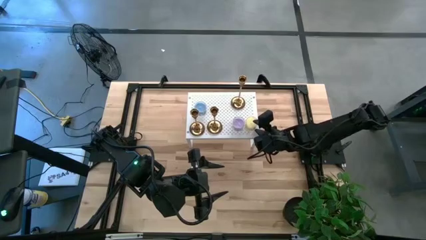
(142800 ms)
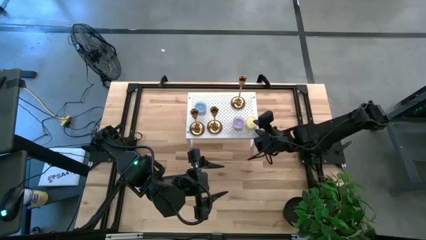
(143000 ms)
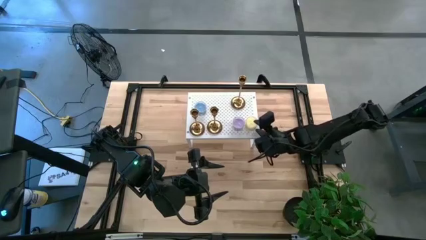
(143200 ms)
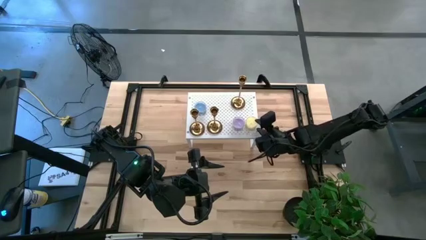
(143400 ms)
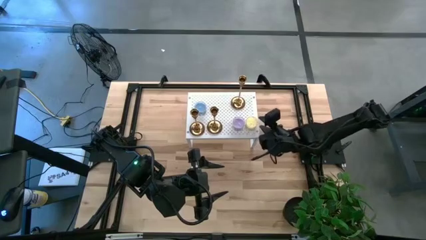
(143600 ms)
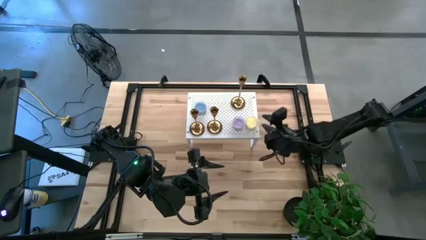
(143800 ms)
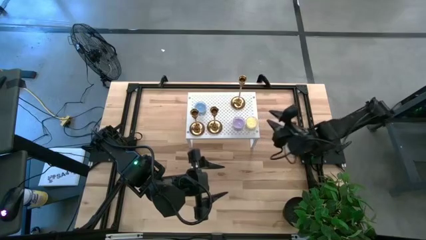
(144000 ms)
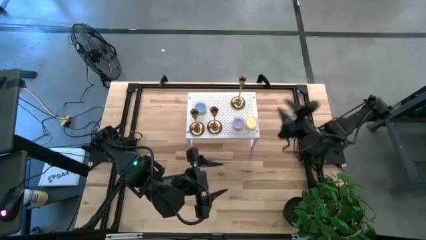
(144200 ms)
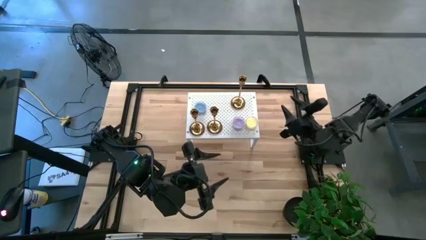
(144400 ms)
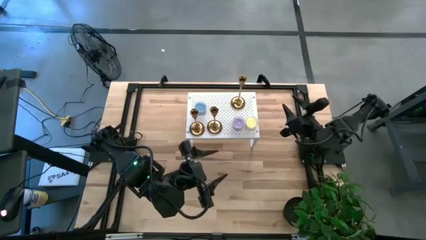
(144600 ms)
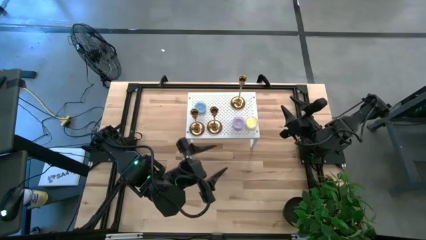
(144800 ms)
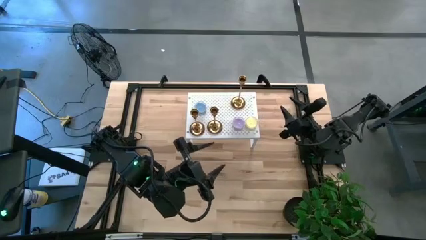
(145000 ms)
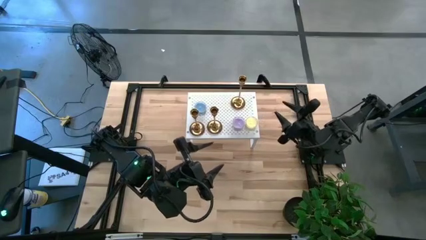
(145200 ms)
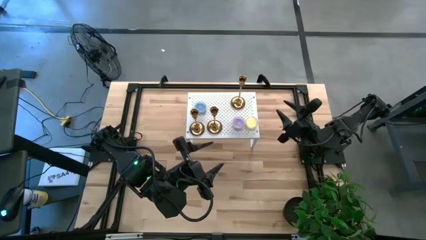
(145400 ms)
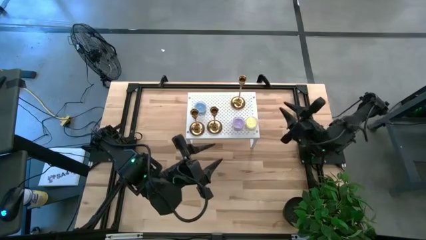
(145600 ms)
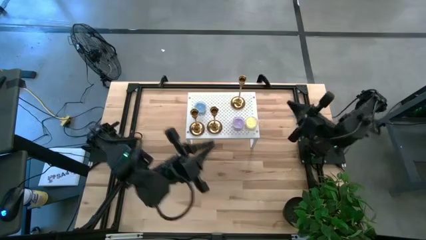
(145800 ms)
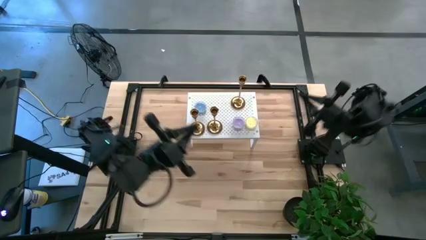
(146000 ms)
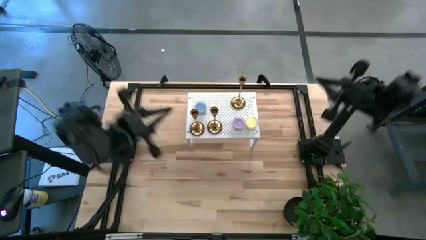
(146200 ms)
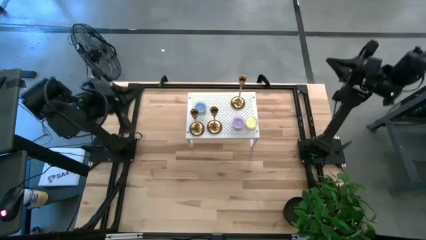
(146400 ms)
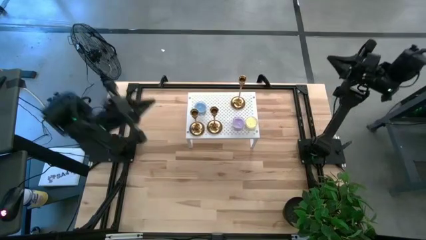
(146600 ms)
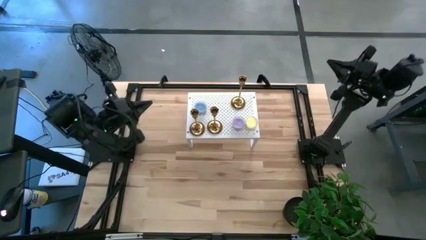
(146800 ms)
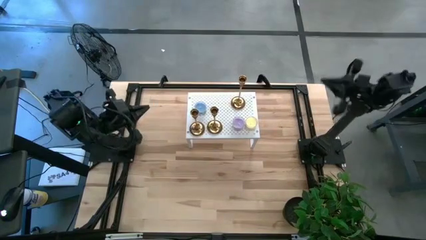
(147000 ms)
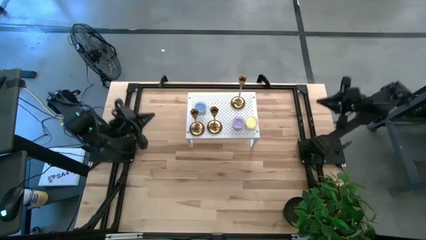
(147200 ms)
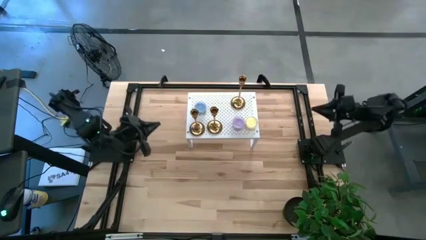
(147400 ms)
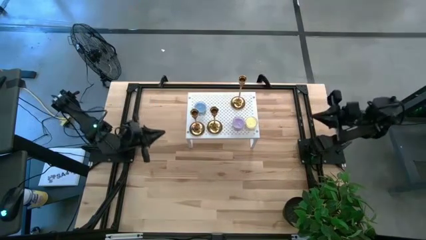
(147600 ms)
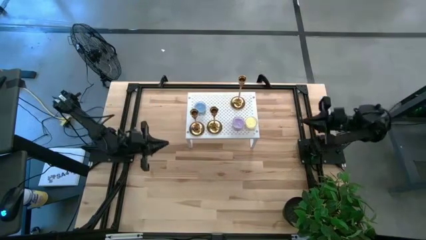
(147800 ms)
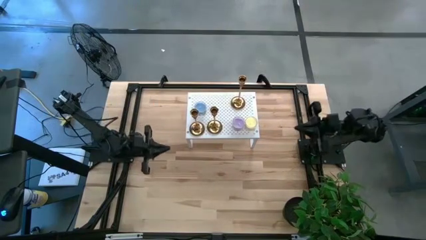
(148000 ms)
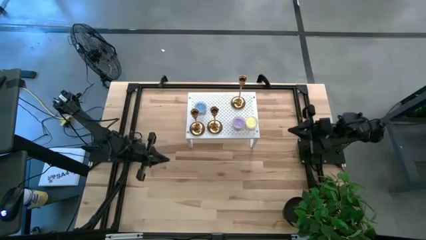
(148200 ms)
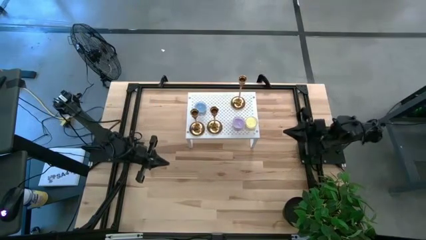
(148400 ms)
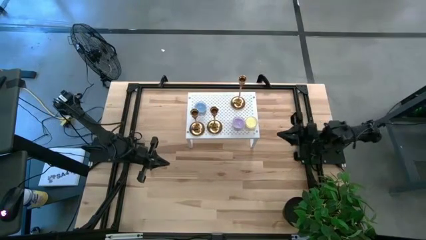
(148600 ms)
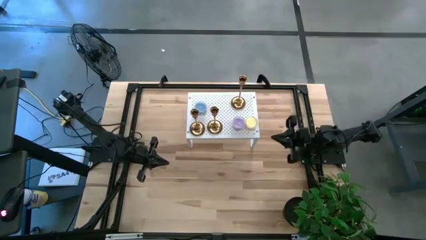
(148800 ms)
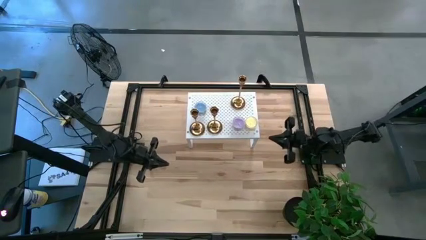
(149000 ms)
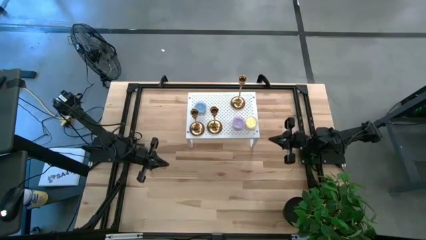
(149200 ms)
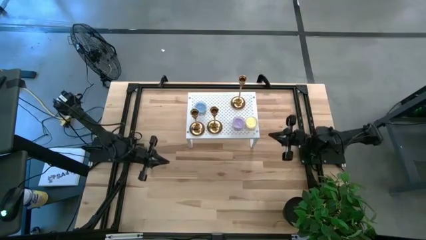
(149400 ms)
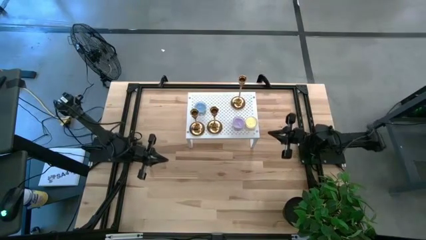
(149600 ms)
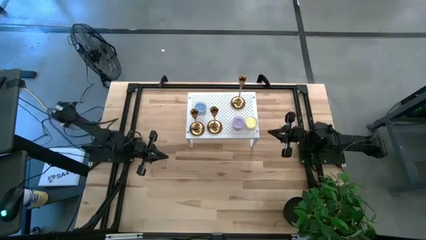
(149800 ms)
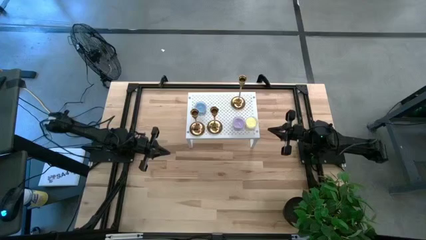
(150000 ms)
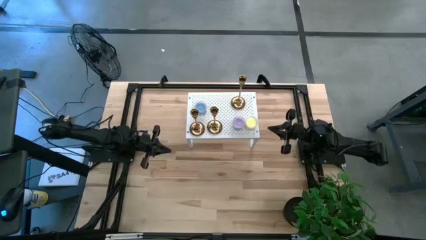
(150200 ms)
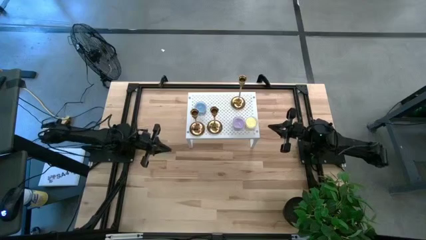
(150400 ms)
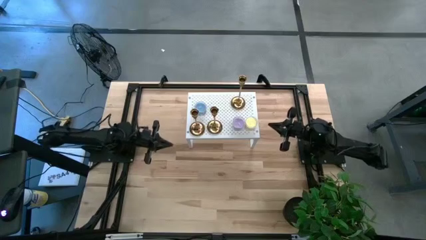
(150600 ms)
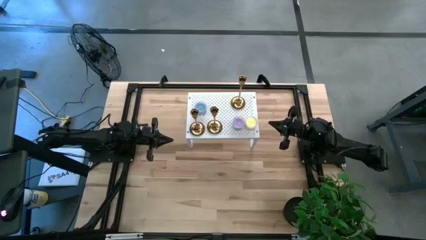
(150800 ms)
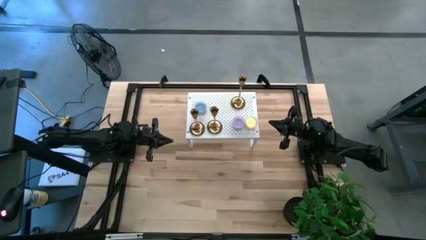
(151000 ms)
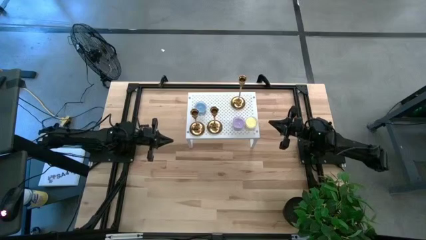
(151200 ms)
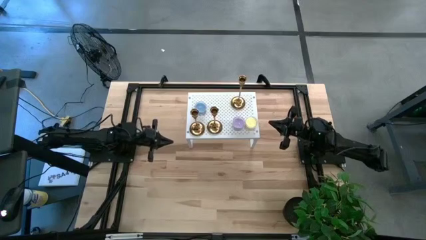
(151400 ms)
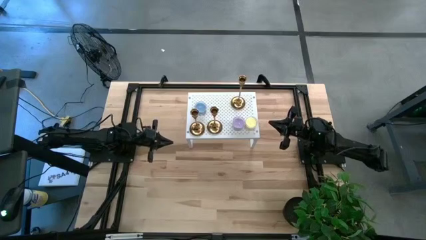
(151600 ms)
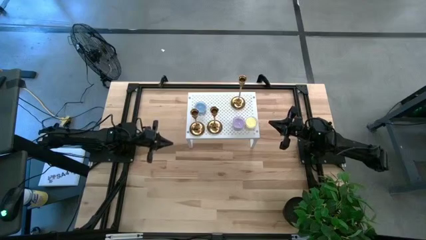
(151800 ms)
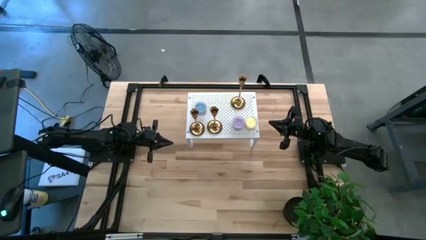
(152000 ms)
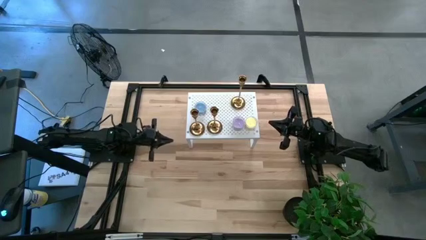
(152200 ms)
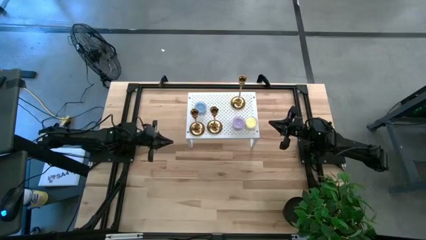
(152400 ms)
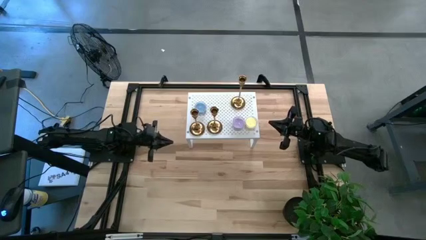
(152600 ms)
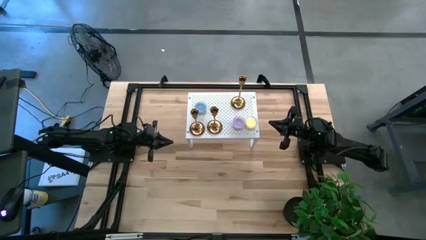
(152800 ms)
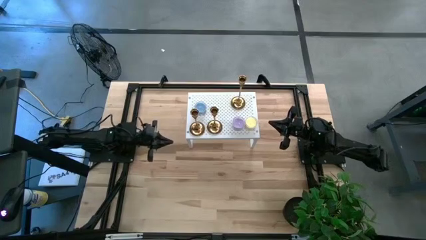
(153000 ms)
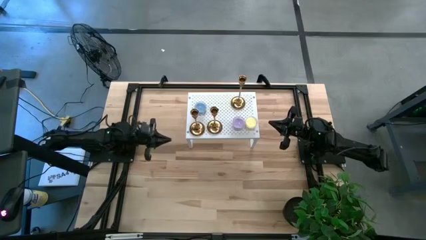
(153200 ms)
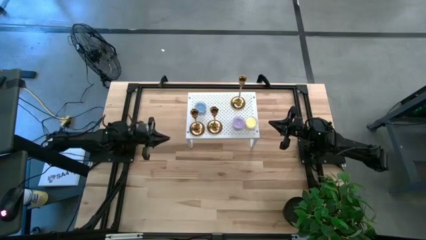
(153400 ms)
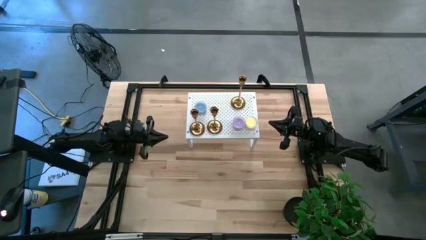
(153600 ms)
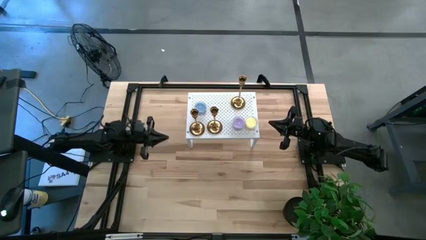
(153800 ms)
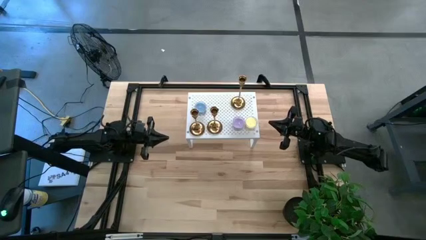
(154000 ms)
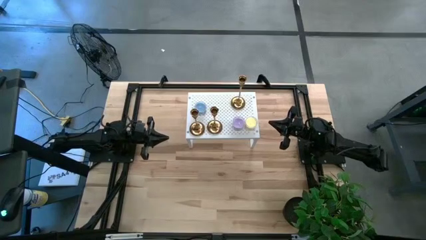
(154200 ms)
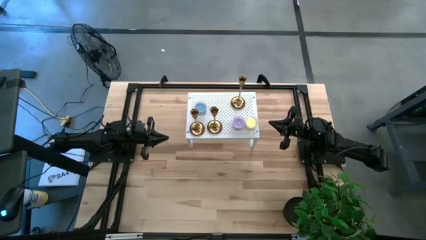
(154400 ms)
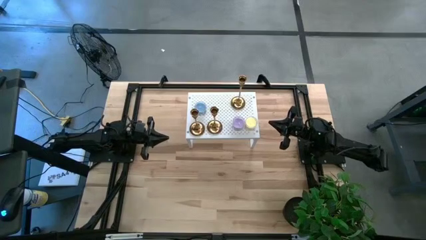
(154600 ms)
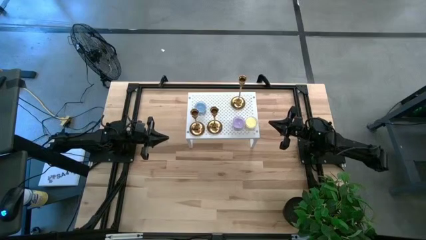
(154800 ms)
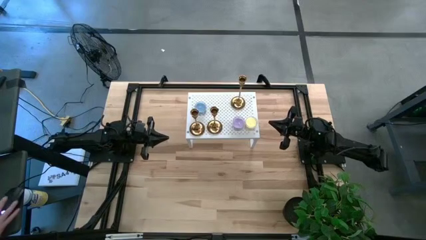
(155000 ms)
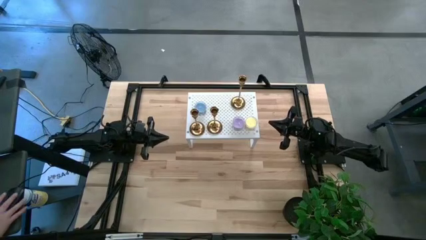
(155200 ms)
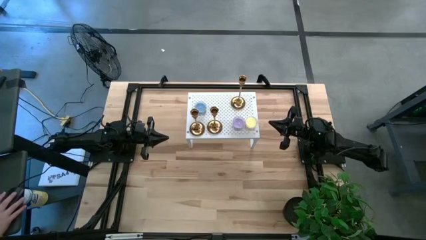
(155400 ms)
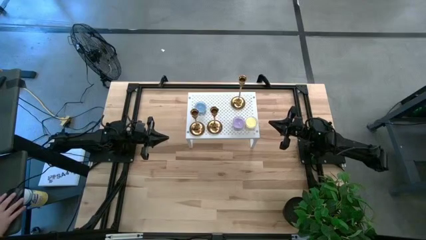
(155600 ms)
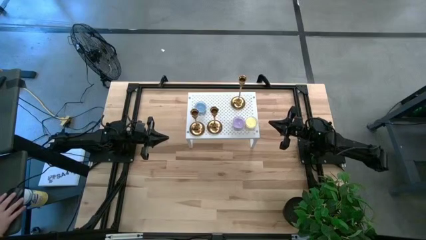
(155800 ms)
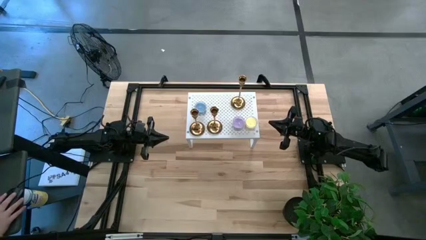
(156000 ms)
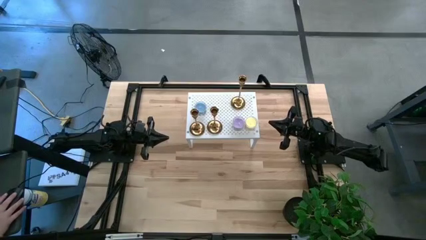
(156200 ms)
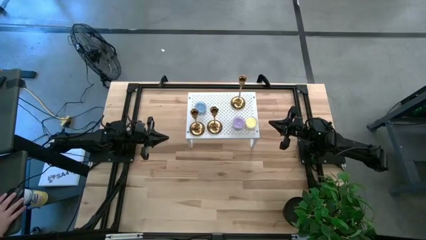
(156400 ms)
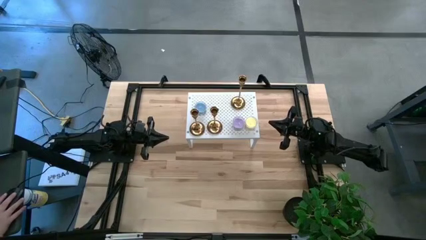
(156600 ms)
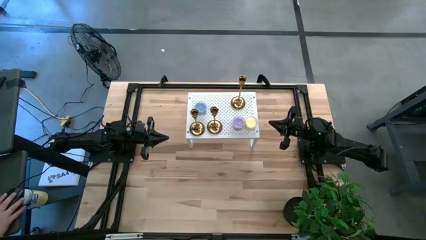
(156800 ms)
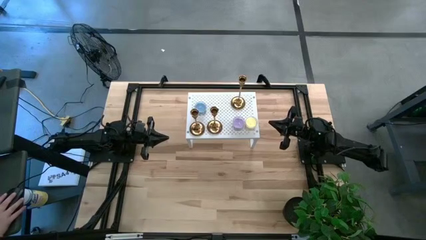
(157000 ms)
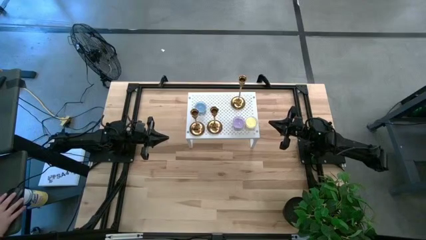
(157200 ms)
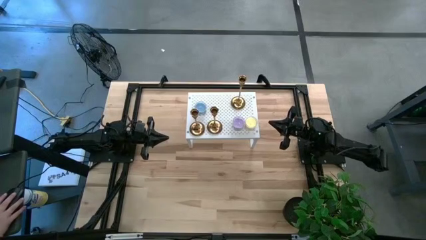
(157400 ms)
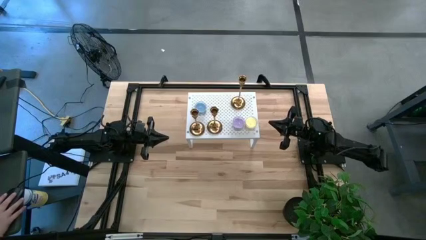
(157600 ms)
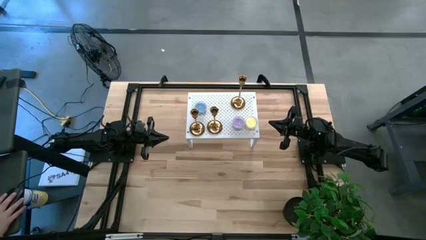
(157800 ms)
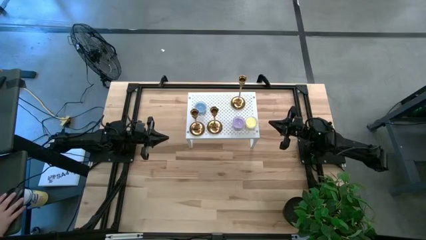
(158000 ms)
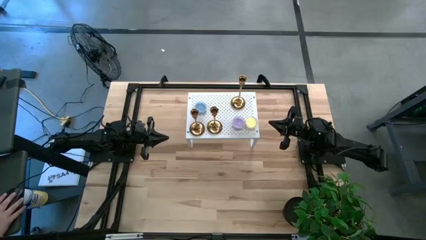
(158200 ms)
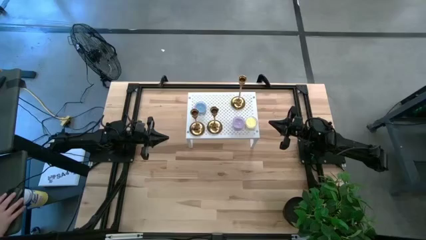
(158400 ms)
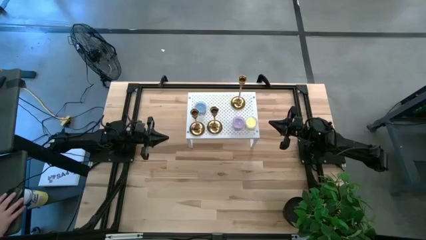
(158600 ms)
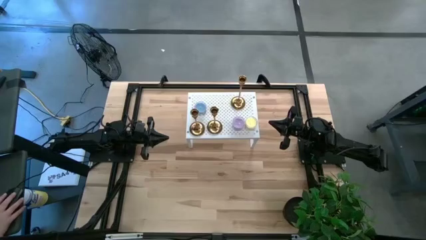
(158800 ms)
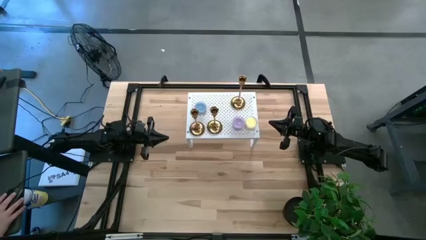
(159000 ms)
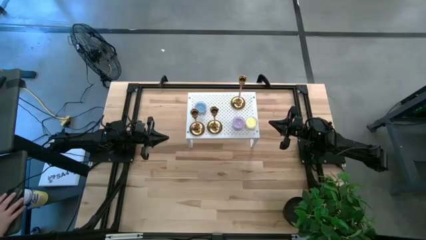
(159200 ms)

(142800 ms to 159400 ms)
Task: Pick & Place candle stick holders
Return to Home Position
